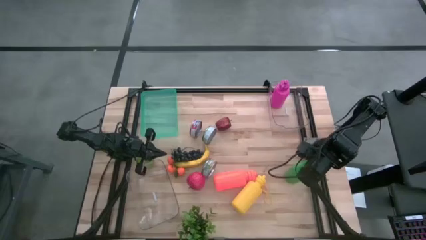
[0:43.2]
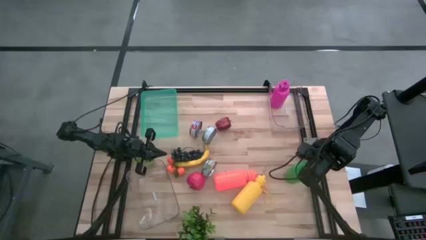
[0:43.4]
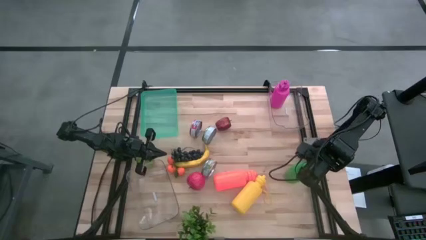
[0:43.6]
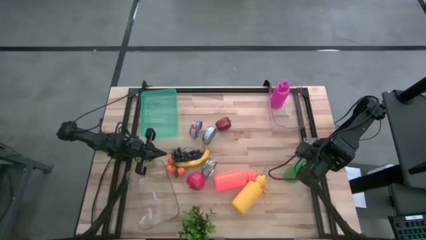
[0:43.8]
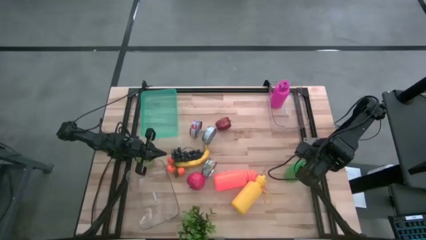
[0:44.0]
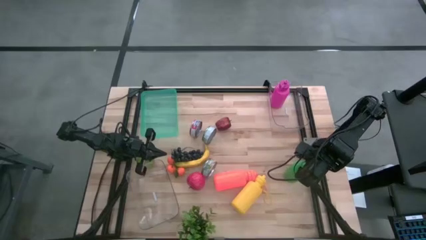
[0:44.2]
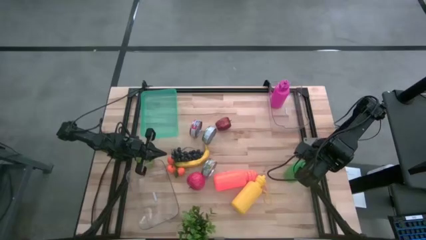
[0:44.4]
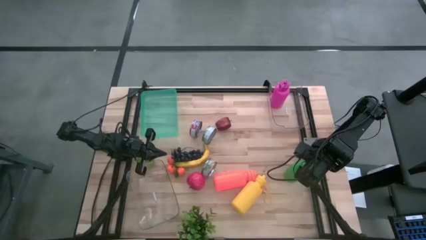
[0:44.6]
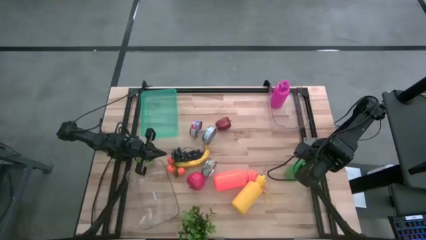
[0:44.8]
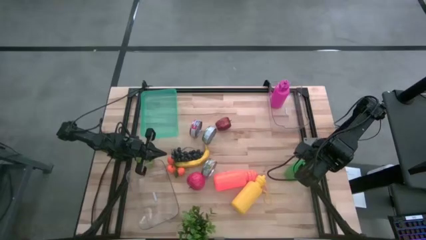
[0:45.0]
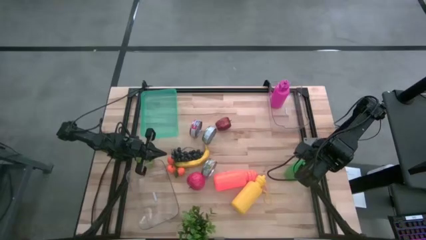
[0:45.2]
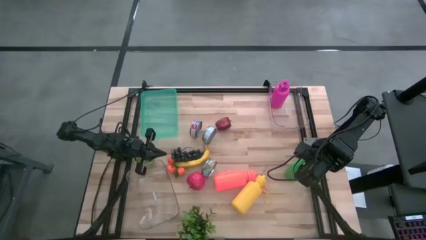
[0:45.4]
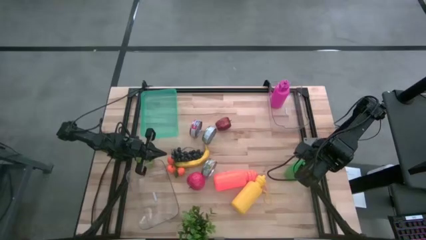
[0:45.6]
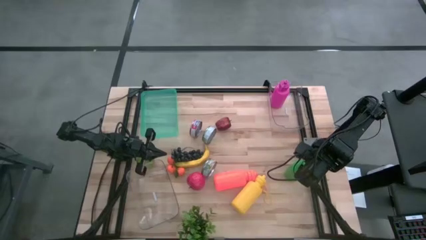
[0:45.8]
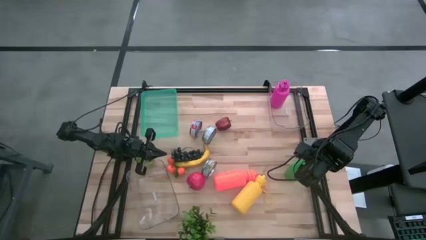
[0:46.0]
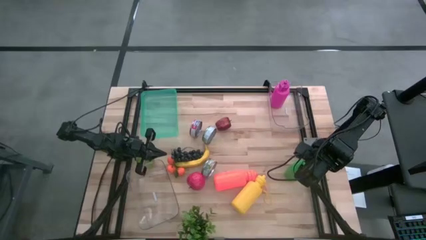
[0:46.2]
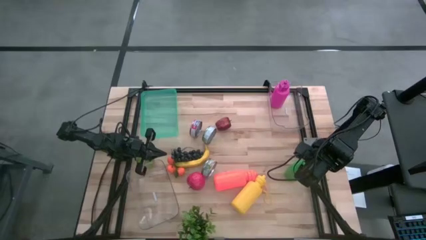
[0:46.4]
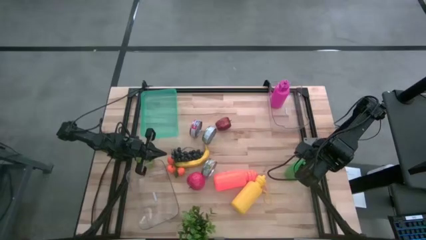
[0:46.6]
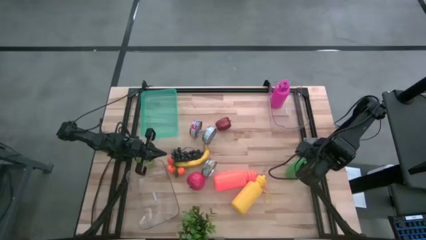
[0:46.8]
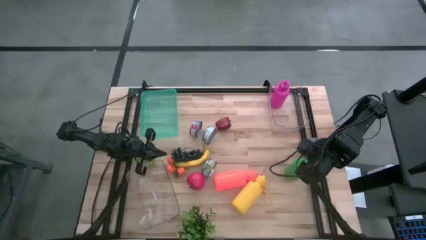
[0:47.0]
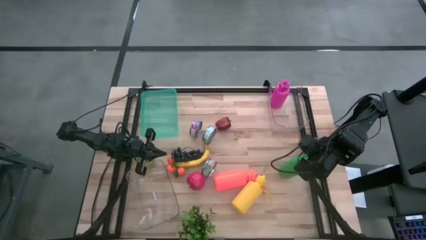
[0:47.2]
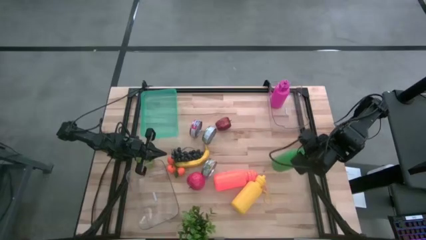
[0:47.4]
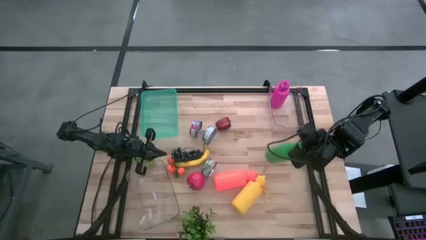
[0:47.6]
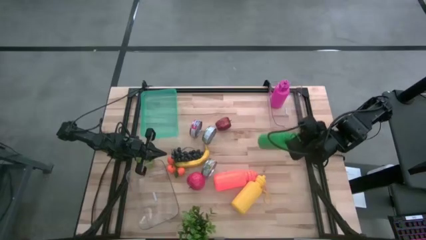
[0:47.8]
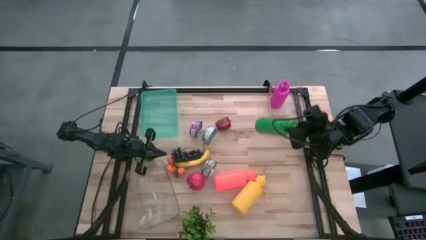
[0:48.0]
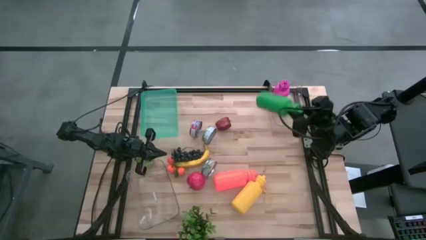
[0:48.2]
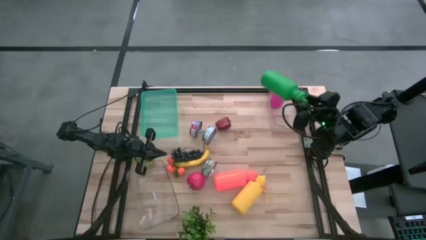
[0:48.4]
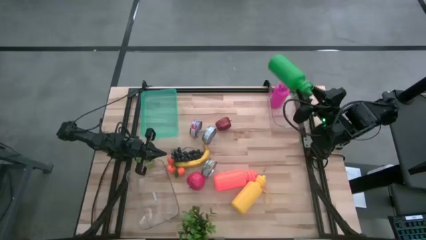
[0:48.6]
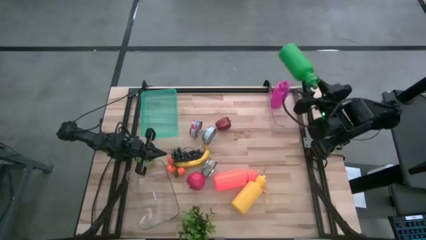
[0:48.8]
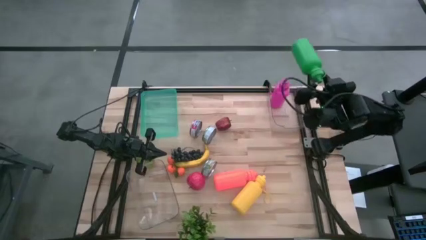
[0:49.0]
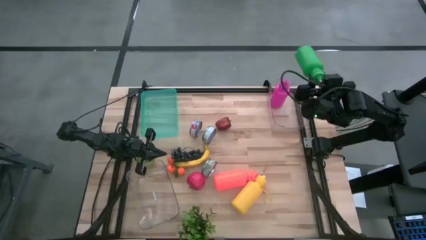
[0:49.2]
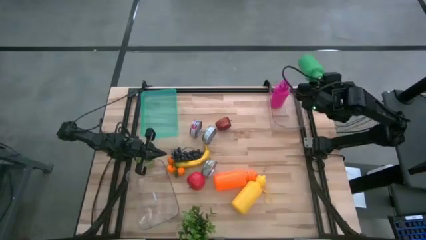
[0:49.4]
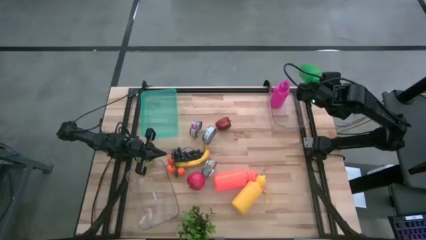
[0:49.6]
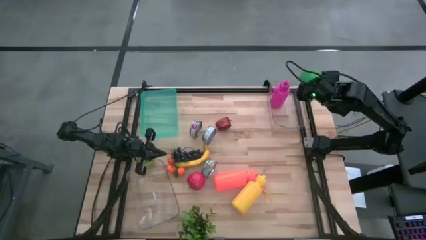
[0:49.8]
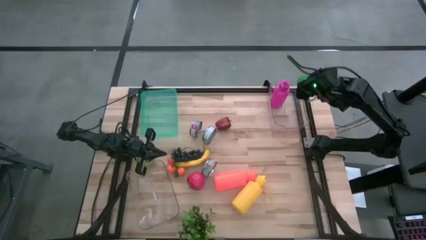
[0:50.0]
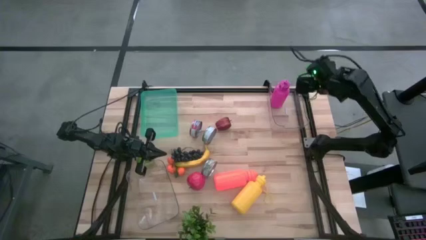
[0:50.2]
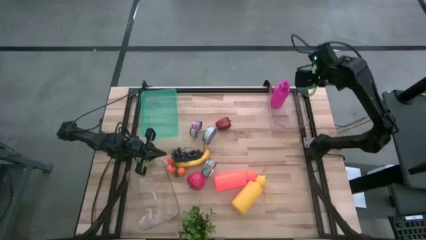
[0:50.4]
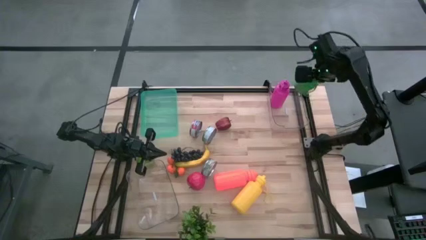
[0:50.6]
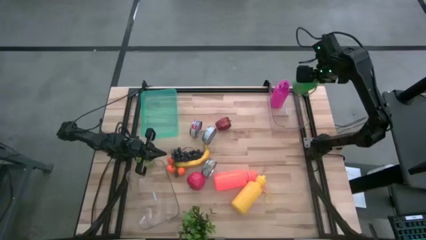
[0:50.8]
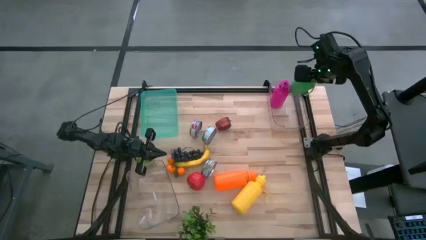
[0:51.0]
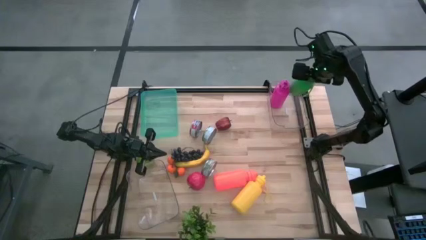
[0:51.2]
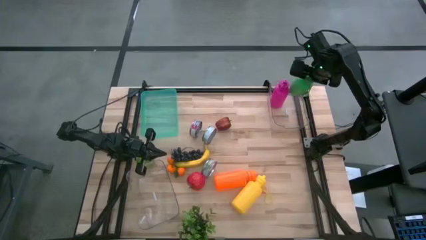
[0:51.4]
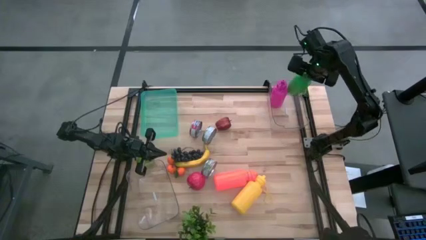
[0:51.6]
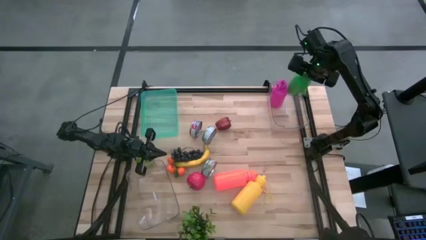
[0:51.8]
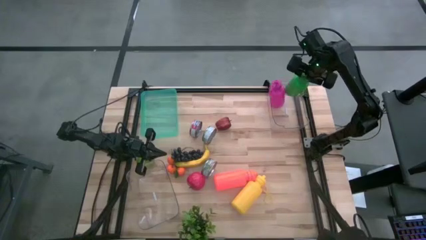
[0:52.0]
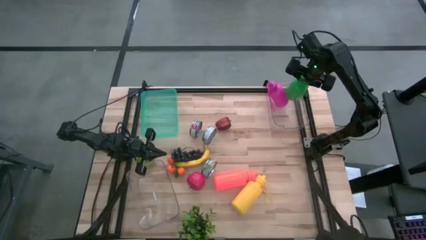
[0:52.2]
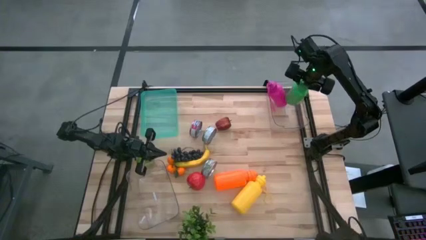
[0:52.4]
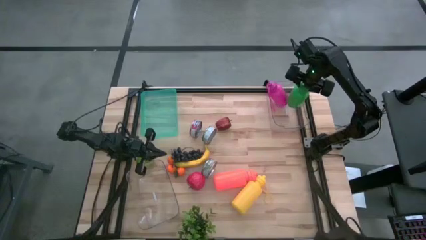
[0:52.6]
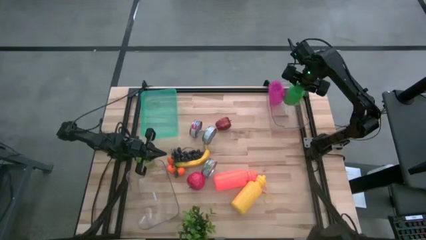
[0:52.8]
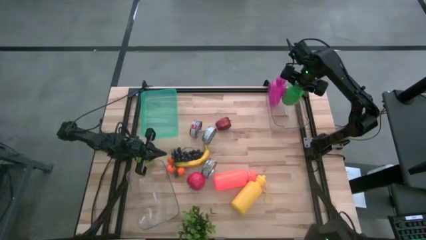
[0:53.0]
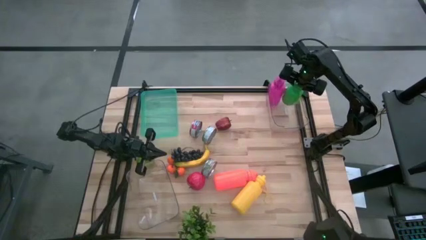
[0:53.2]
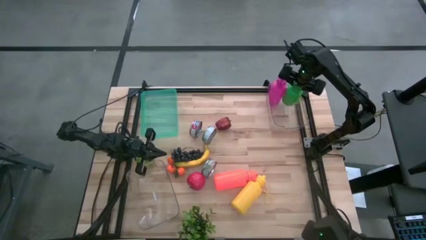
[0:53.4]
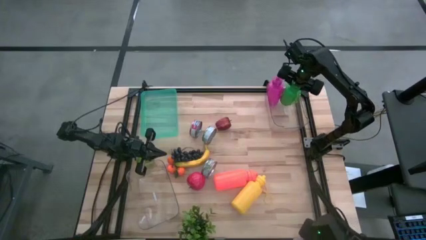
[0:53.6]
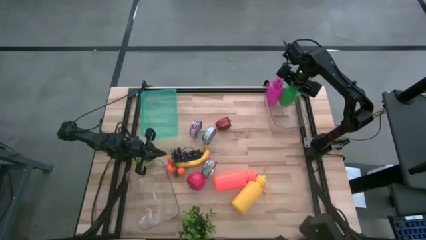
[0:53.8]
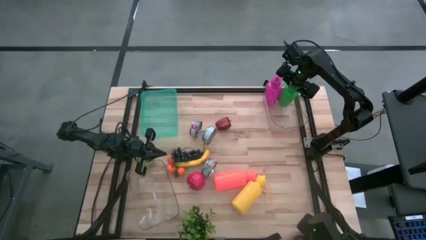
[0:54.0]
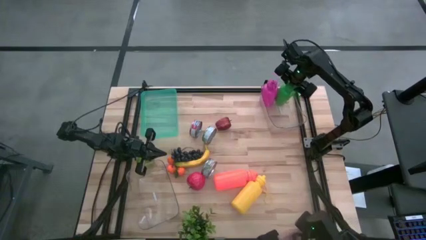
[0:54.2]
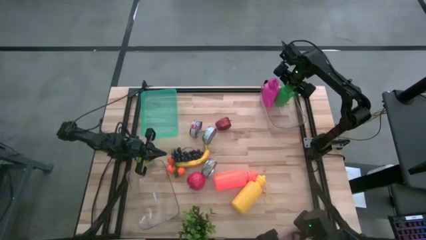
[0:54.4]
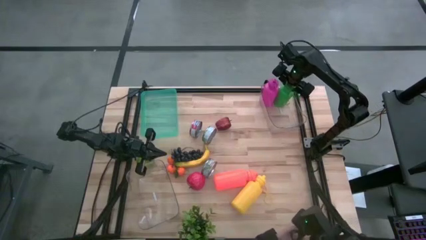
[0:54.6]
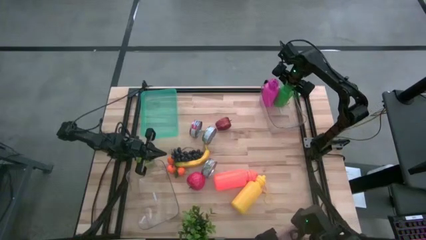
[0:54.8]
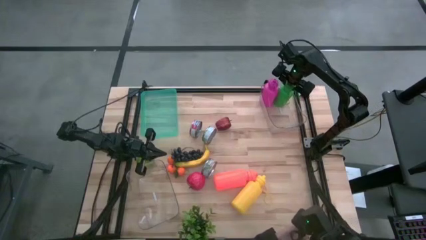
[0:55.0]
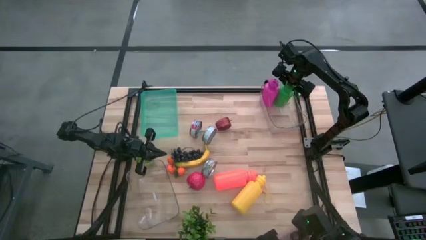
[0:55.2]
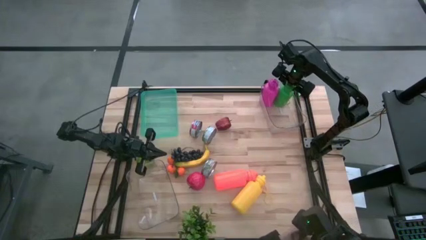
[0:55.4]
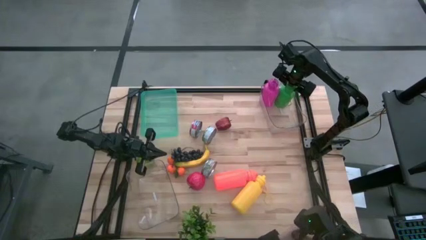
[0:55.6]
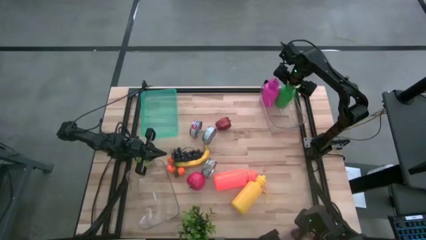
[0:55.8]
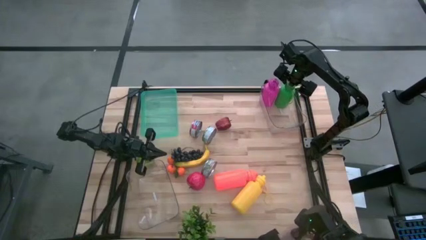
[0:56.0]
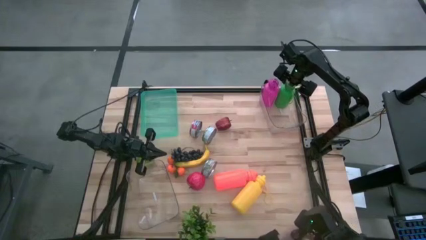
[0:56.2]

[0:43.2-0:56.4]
Task: Pick & Place Food Item
Put the green tumbler bottle into the top right transparent bin
